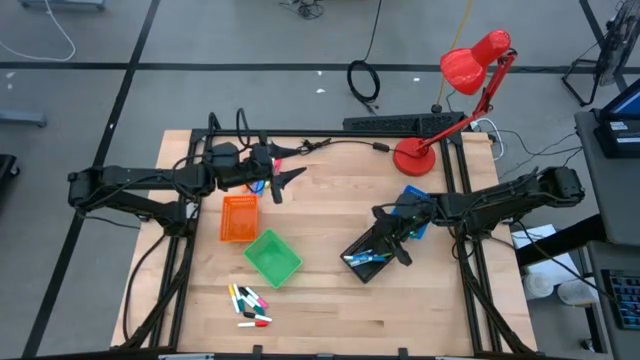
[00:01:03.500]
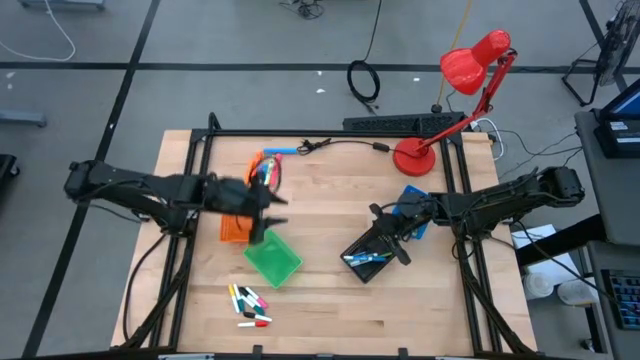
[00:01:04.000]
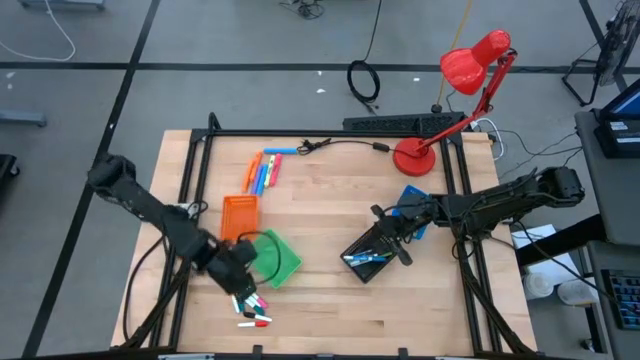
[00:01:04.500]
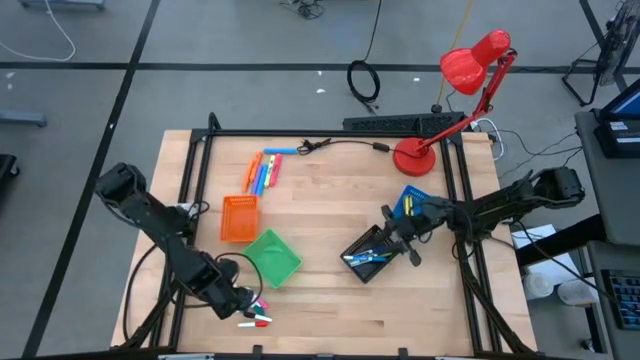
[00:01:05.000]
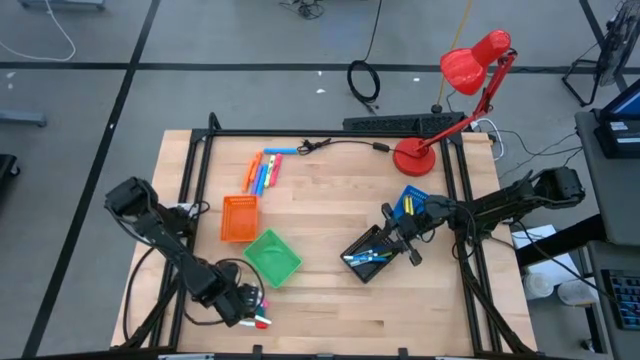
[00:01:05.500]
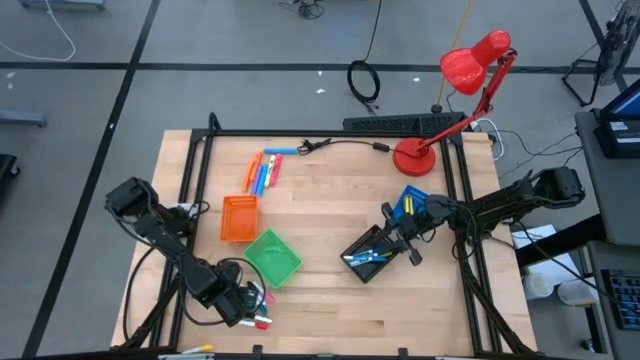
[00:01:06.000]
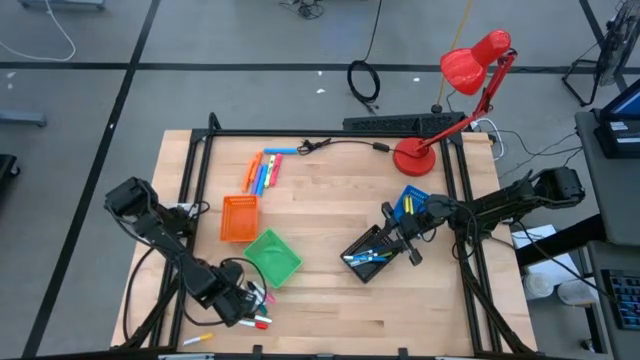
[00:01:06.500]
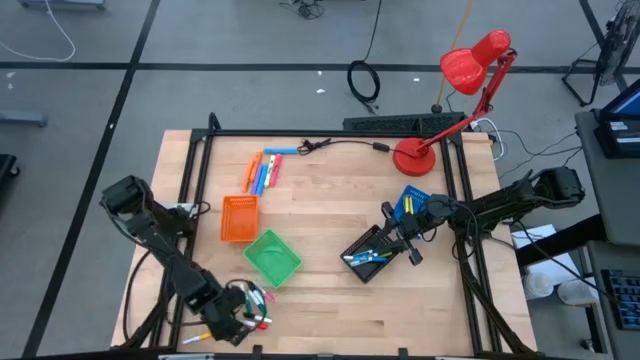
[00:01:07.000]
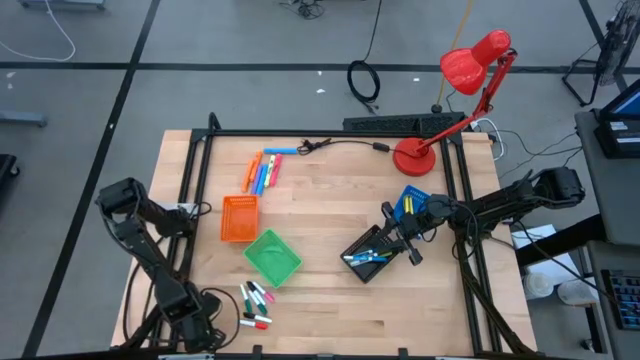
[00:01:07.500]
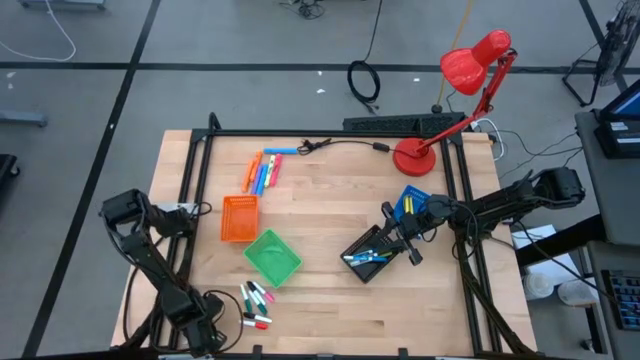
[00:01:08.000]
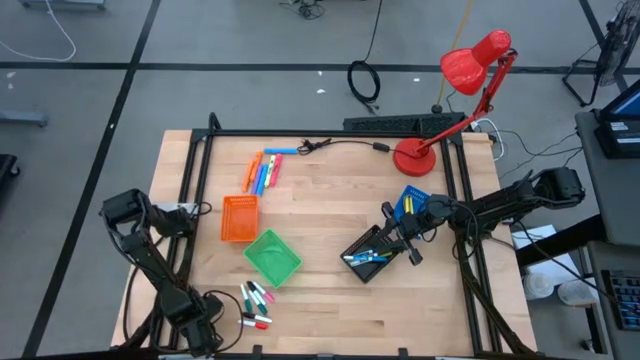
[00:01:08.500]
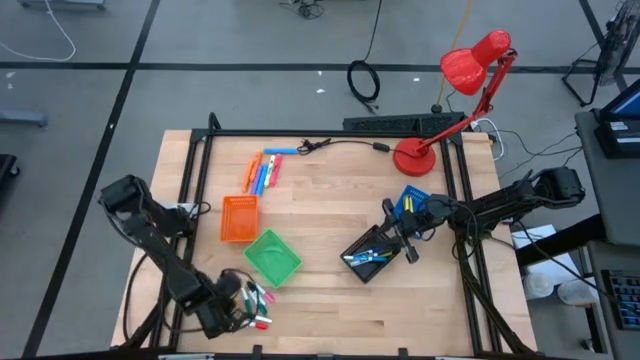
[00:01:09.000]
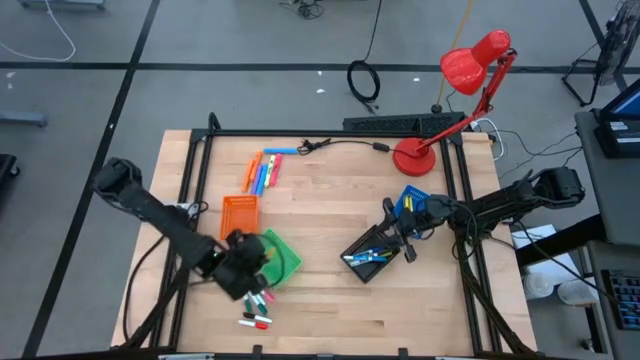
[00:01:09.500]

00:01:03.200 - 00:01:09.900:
Task: Pick & Place Markers
Put the small yellow highlighter pen into the green basket

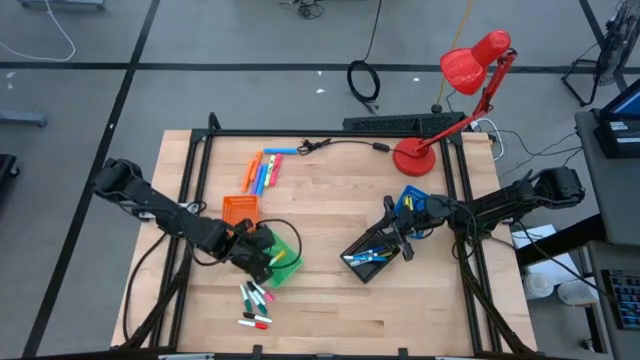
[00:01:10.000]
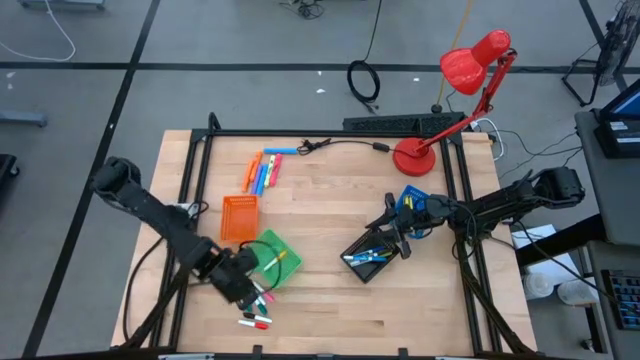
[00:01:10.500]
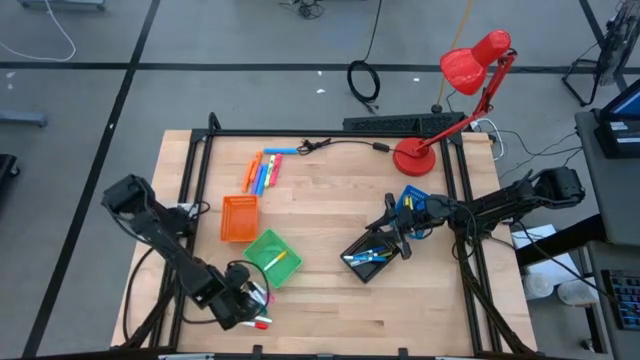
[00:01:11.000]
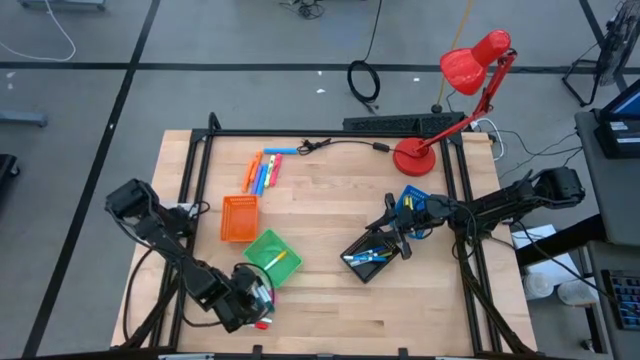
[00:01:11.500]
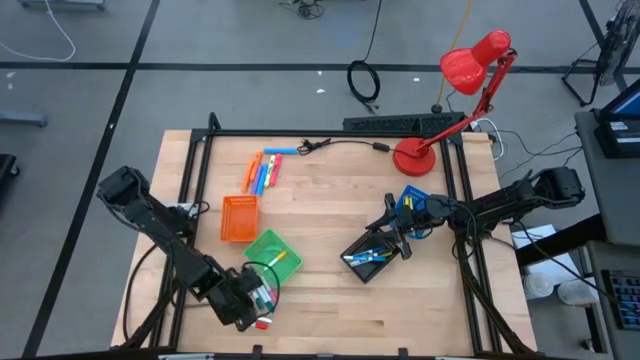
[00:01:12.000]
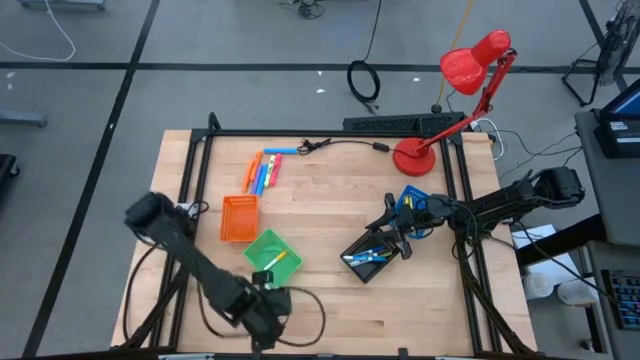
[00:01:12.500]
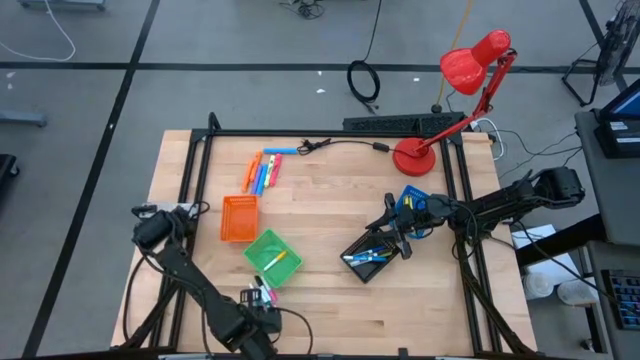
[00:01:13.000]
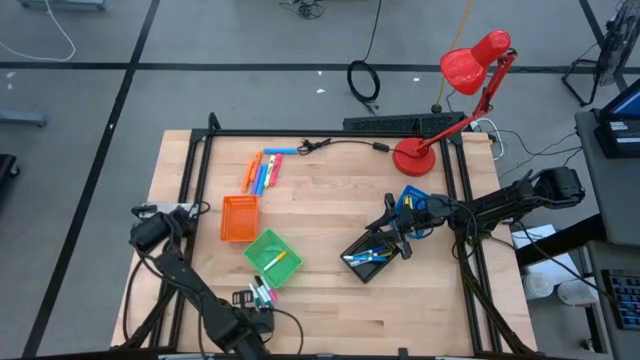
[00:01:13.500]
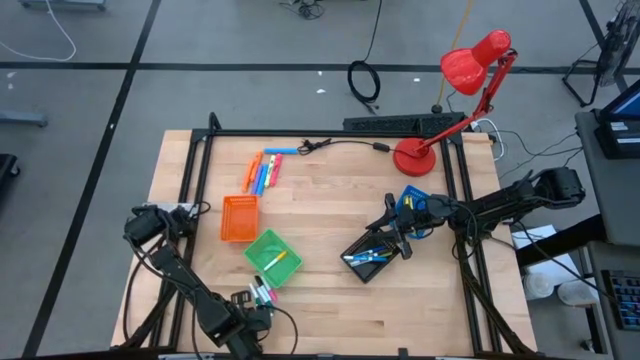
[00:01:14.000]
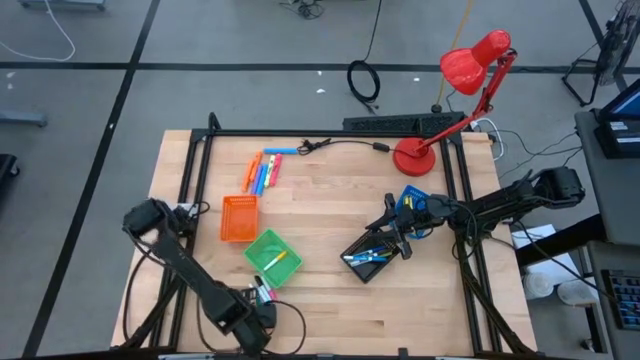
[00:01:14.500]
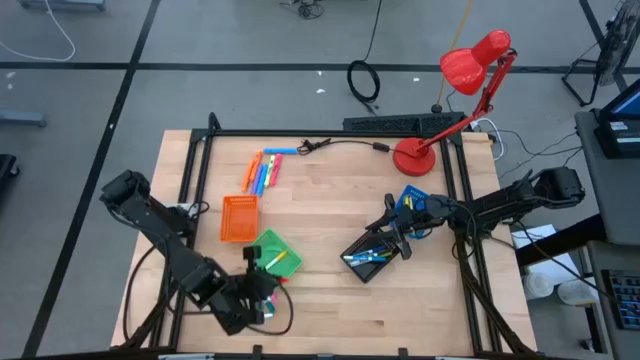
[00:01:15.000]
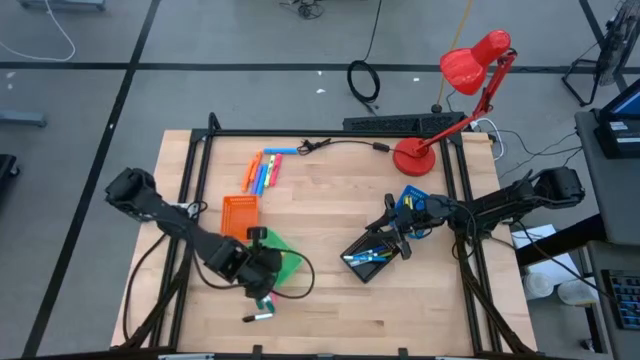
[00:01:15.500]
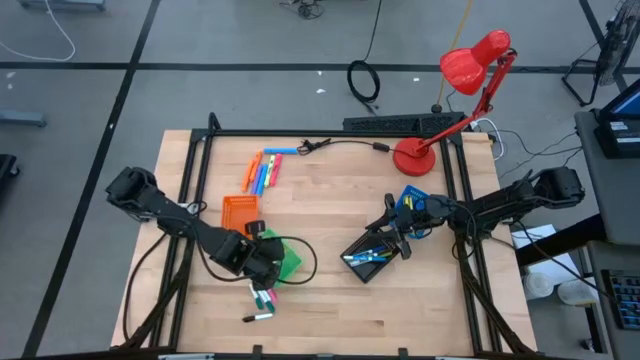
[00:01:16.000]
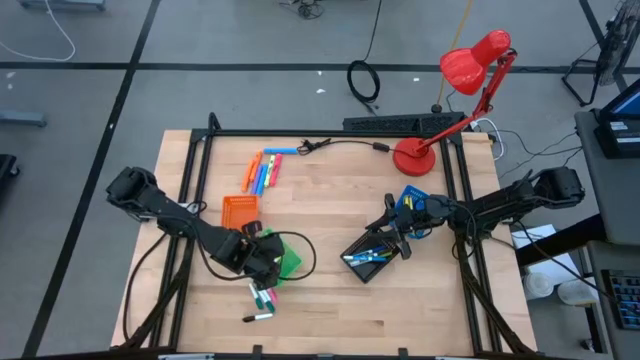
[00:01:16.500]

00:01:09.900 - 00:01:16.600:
Put the small red highlighter pen into the green basket

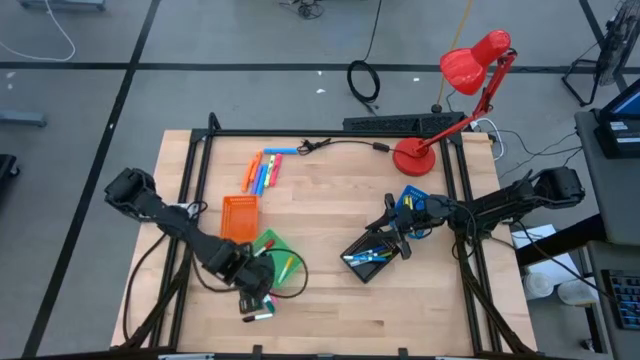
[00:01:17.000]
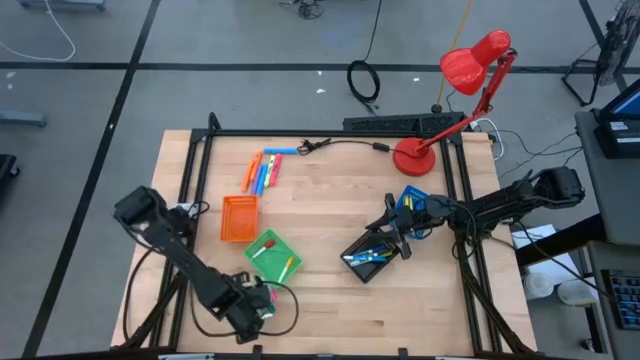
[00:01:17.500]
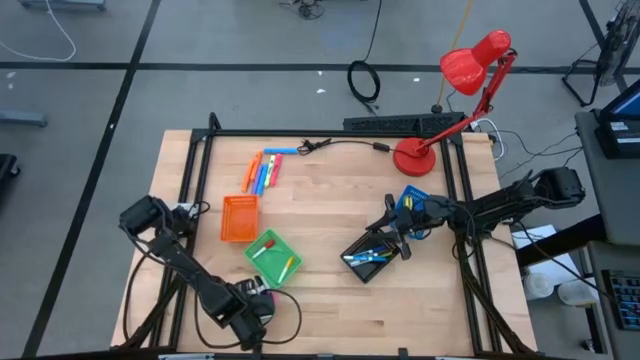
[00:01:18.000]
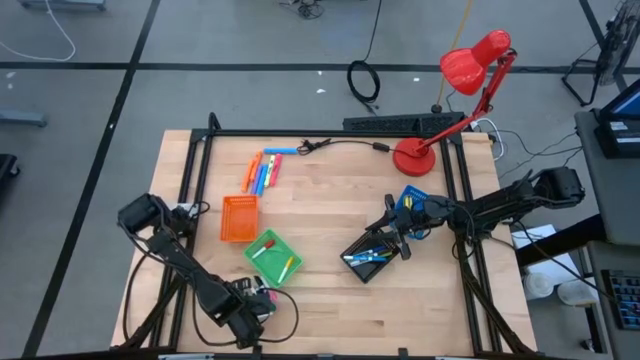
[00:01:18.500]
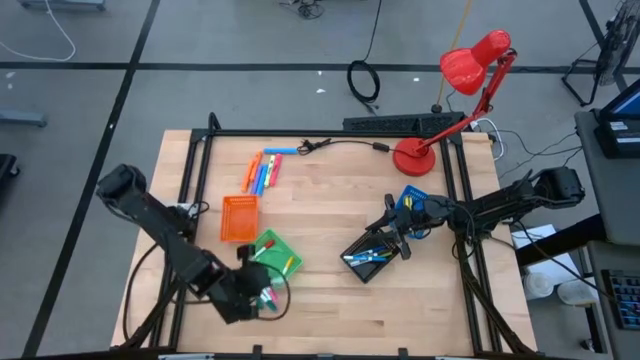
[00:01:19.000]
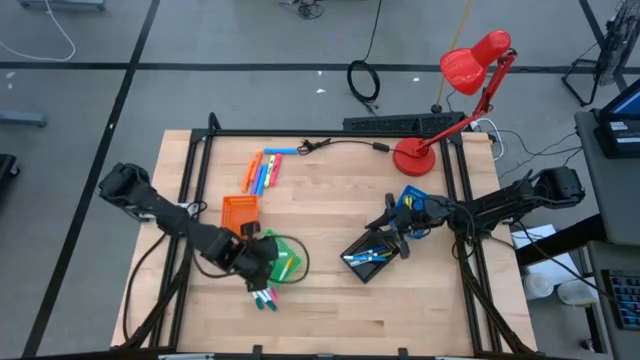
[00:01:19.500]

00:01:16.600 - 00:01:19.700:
Put the bottom small black highlighter pen into the green basket

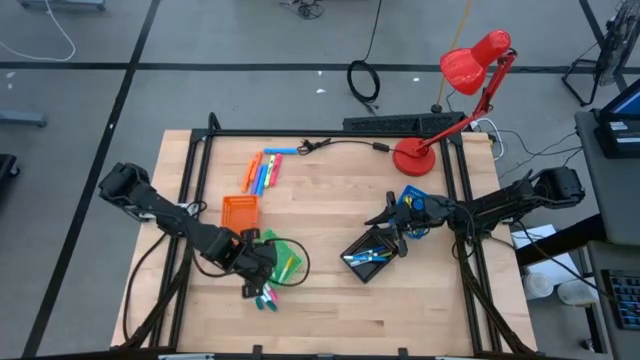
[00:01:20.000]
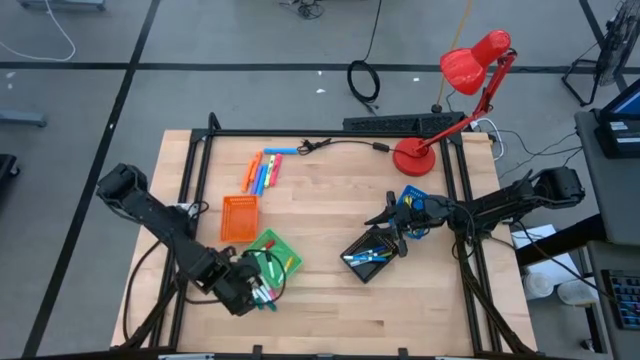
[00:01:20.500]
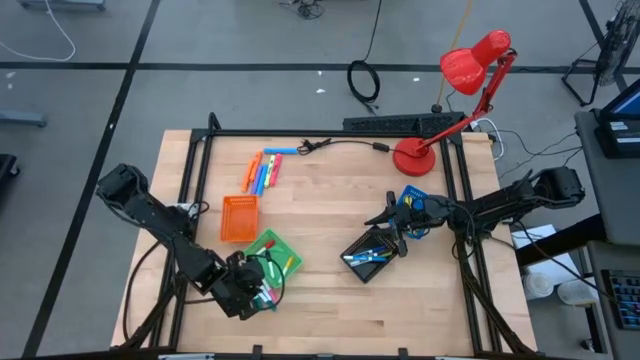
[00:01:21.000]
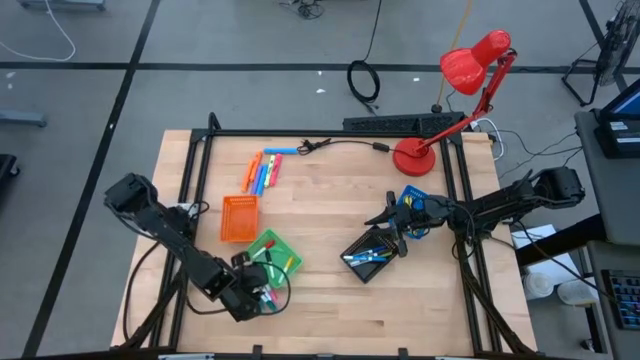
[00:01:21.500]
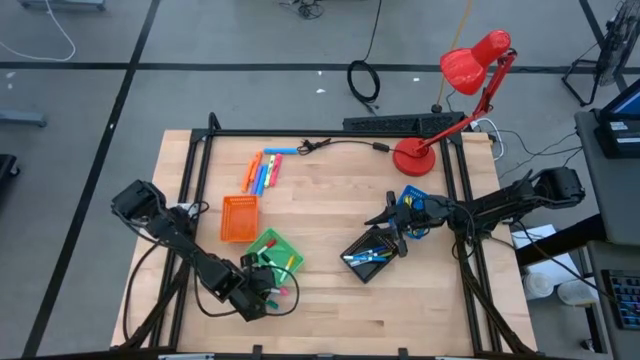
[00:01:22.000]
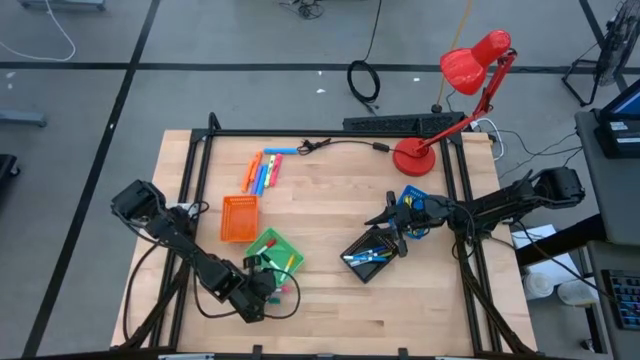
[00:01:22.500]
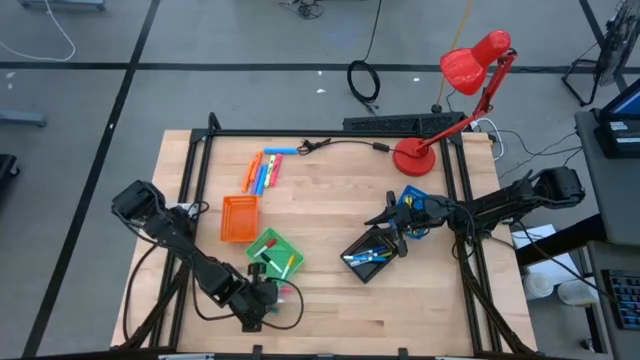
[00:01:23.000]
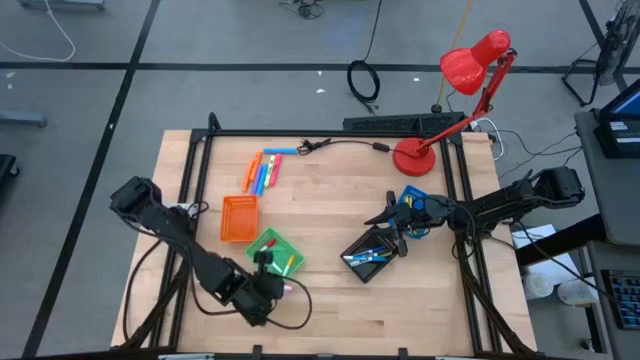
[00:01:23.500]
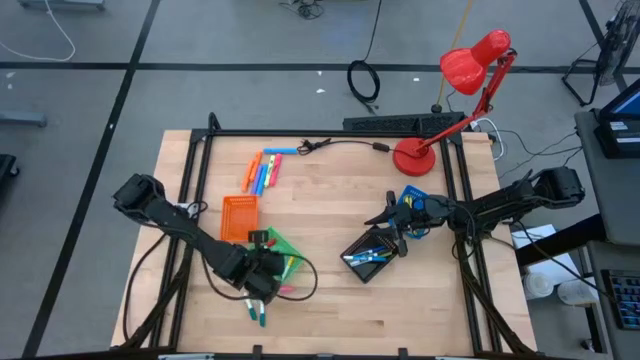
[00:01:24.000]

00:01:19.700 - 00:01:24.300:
Put the small black highlighter pen into the green basket
